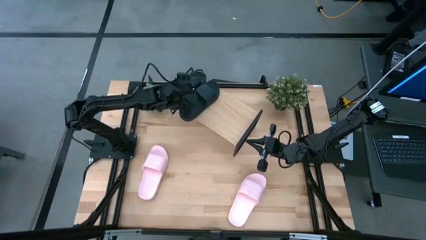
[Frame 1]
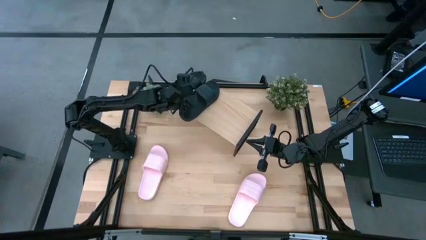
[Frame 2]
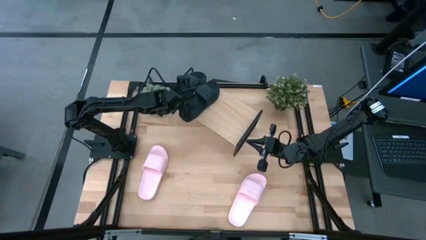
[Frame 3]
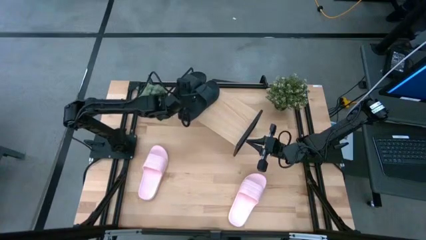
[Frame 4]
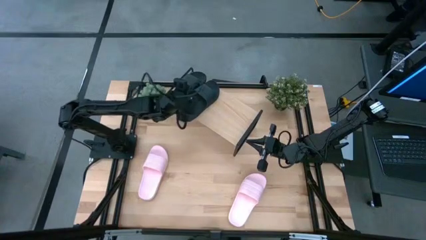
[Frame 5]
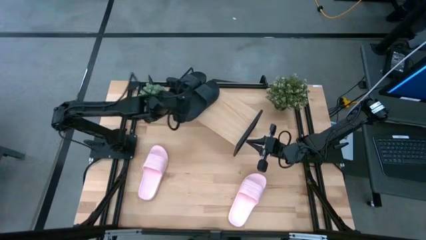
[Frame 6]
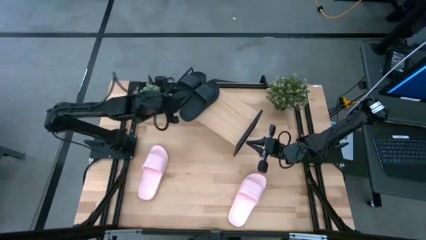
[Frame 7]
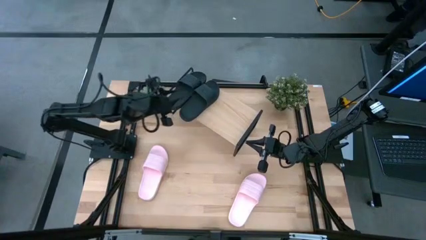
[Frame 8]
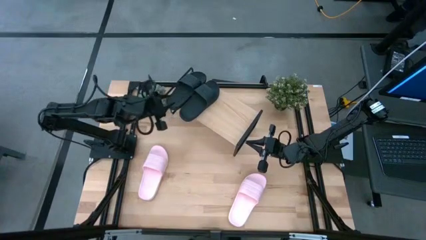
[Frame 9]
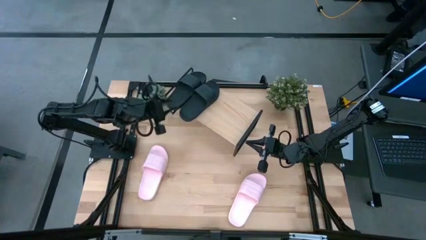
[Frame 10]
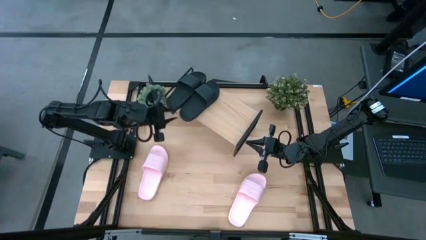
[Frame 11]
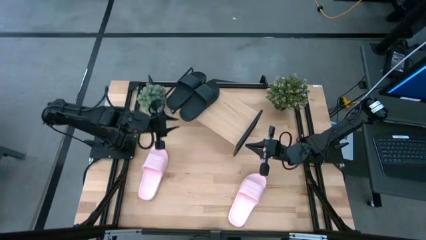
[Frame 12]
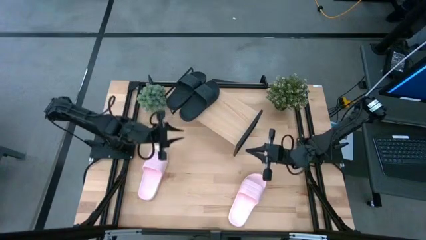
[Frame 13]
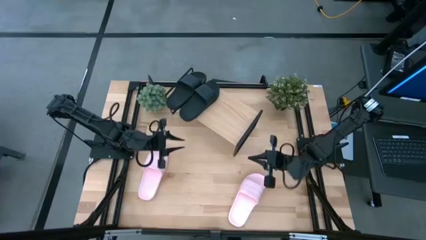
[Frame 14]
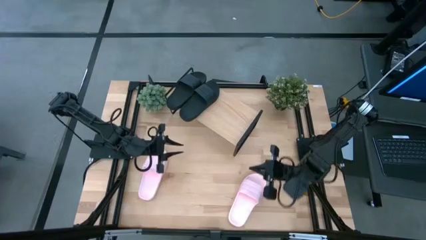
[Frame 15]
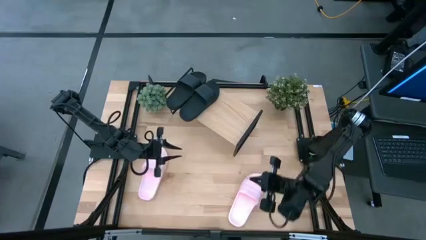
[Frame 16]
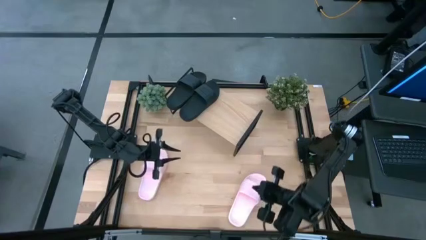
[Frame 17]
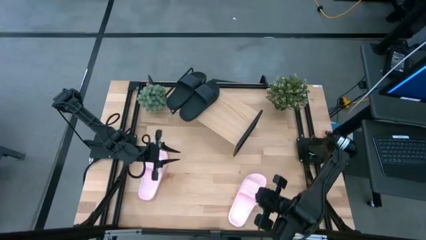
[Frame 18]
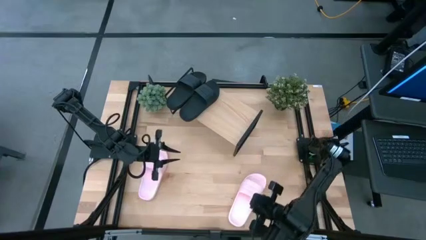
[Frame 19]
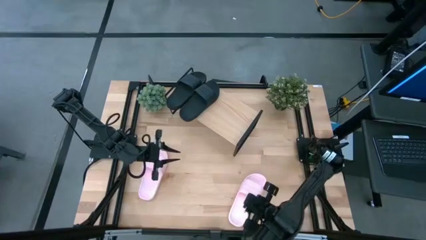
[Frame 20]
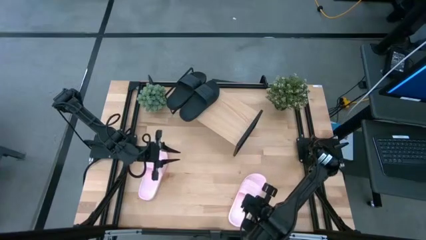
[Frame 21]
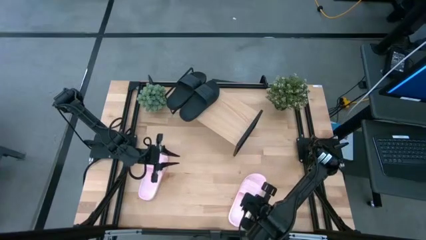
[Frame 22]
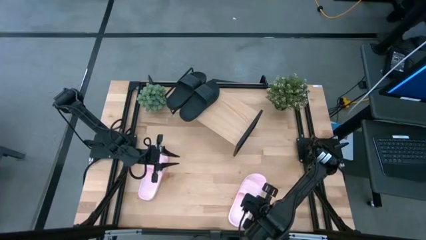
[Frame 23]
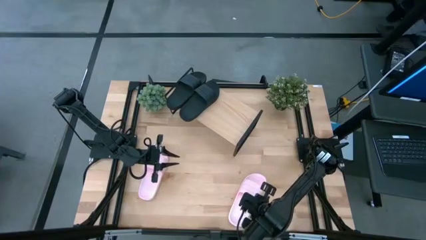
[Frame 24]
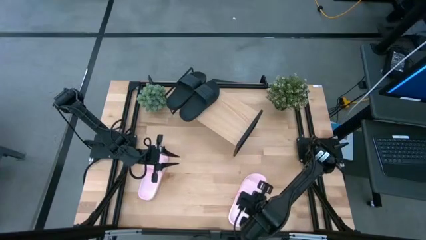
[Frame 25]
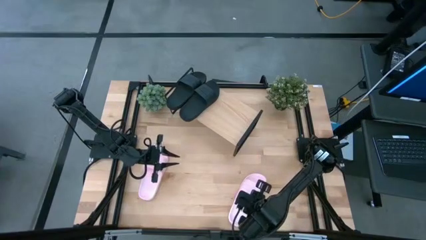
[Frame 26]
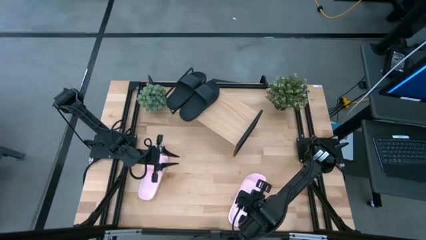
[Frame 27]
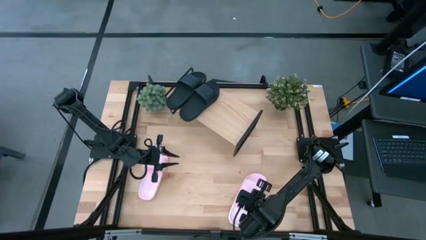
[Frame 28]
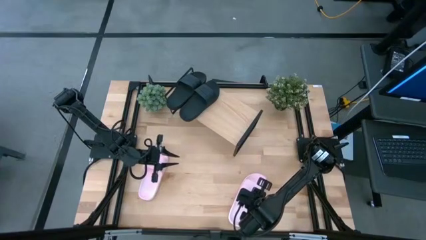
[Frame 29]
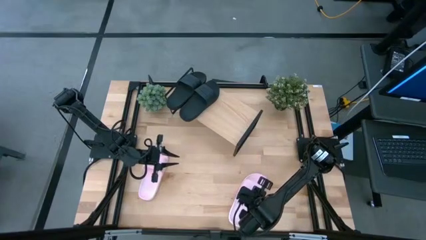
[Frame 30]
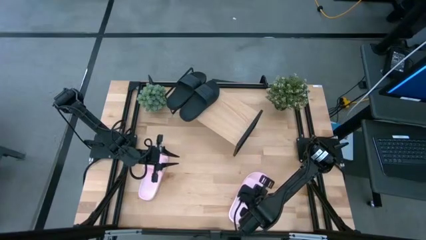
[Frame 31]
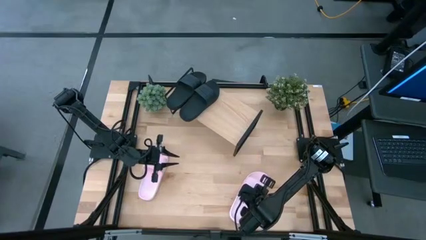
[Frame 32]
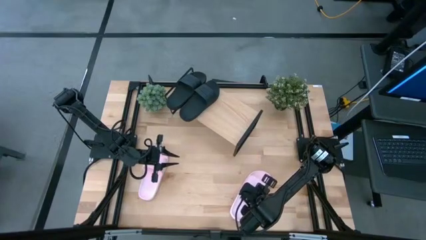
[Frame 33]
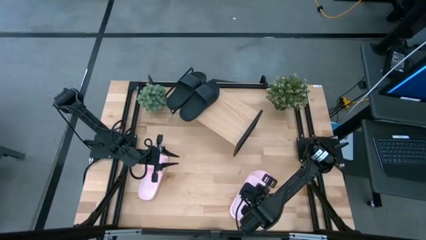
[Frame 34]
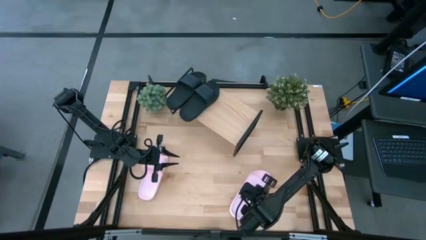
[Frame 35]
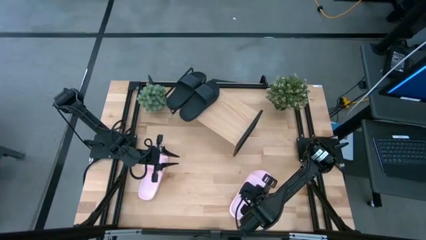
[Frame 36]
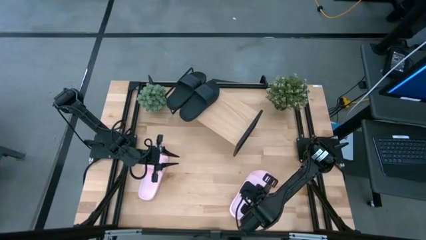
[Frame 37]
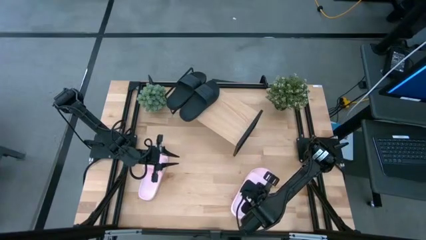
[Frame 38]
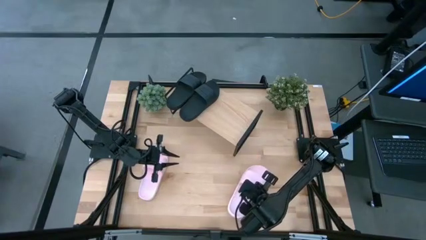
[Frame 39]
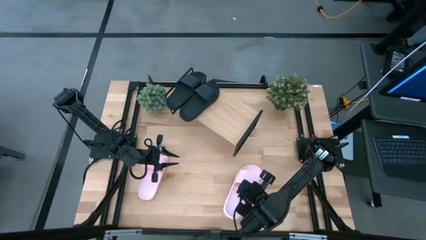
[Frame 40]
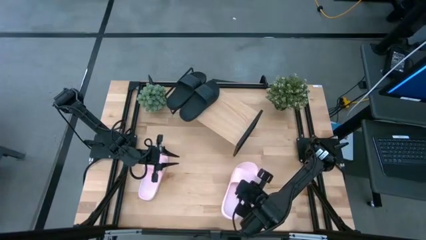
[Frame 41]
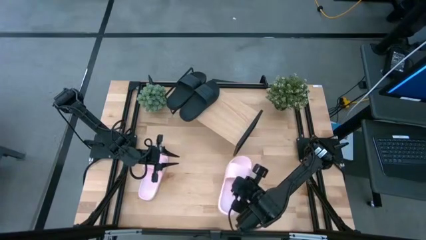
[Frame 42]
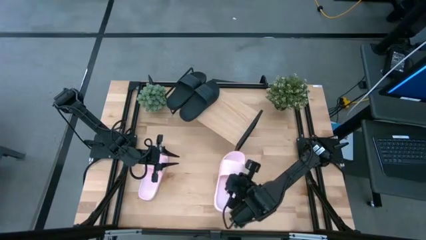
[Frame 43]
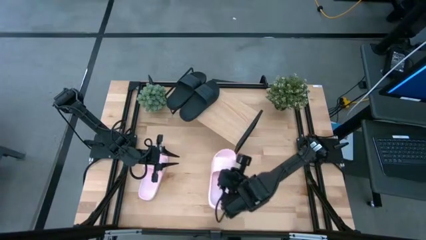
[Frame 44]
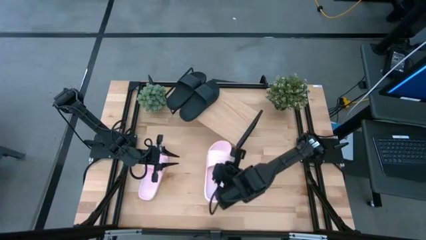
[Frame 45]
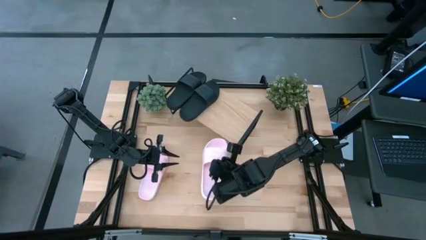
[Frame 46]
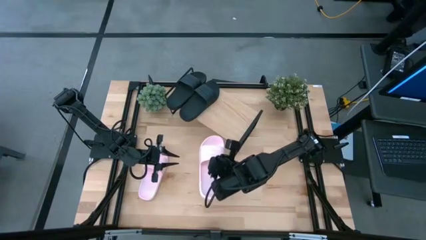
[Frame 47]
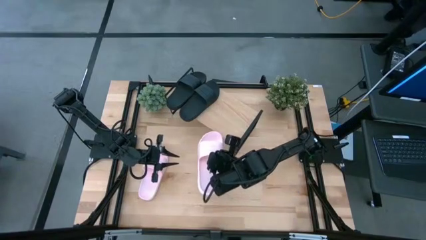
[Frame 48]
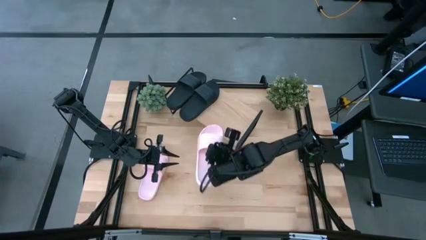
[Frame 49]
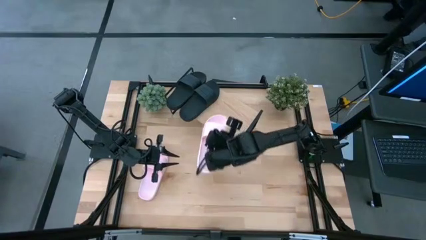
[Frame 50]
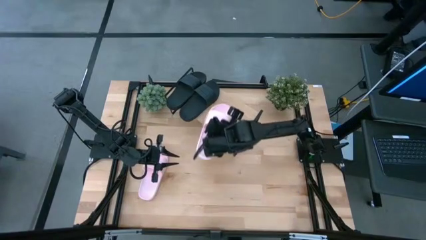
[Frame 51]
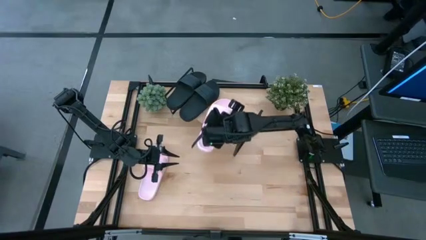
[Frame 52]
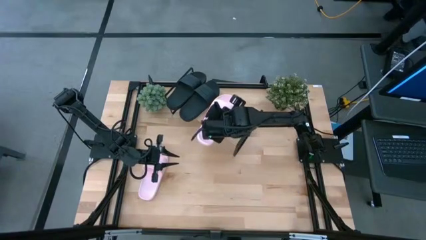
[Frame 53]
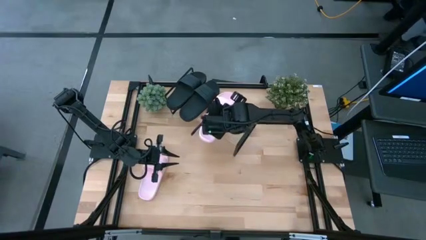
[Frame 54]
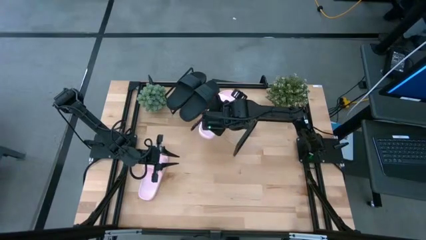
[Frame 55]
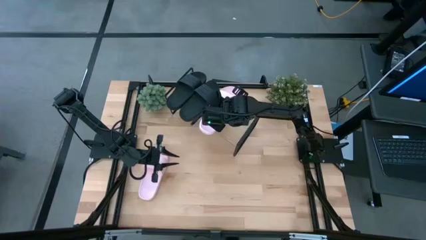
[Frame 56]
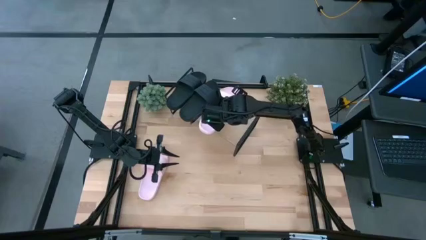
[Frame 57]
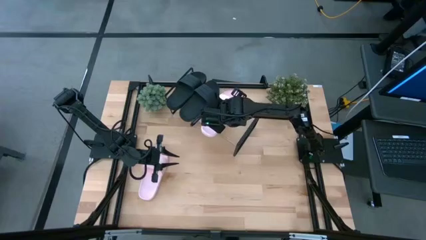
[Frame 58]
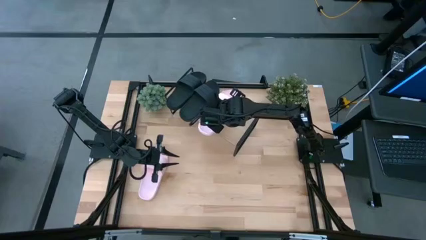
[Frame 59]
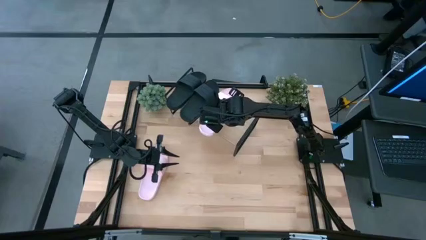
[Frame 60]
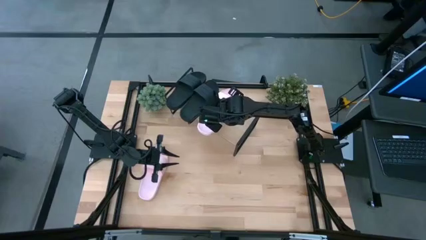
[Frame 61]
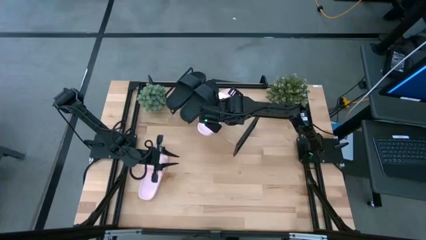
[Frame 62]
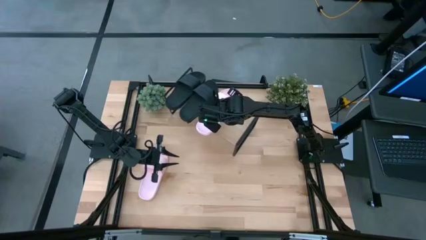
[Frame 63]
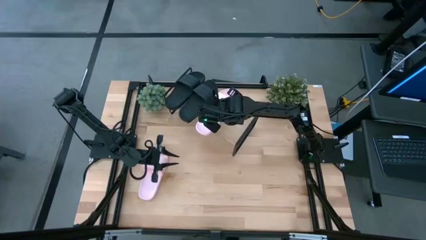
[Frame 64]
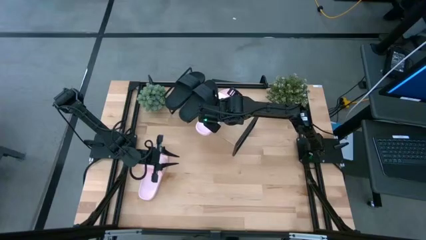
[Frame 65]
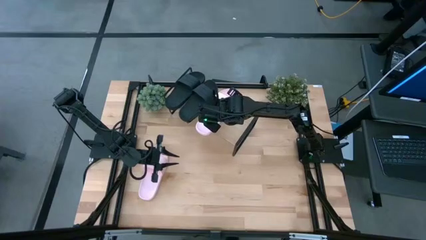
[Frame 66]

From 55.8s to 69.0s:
Task: Pick and place slides into the shelf
Put the left pink slide on the shelf
